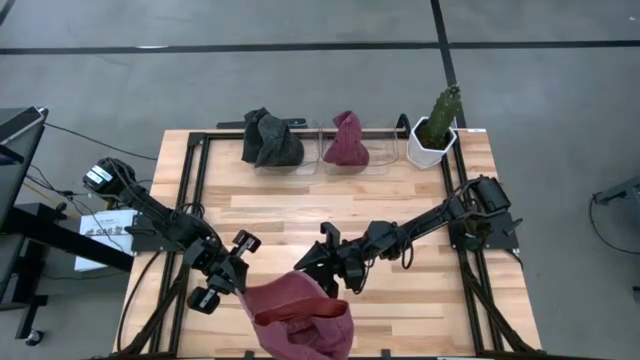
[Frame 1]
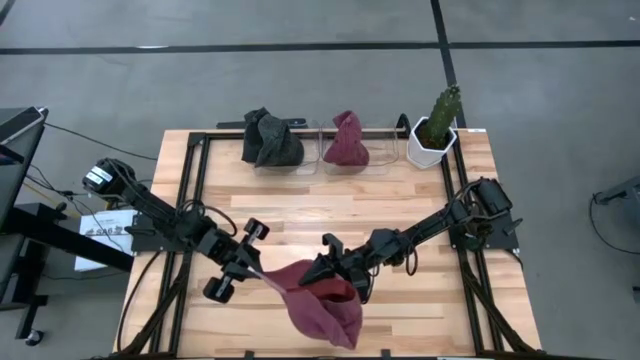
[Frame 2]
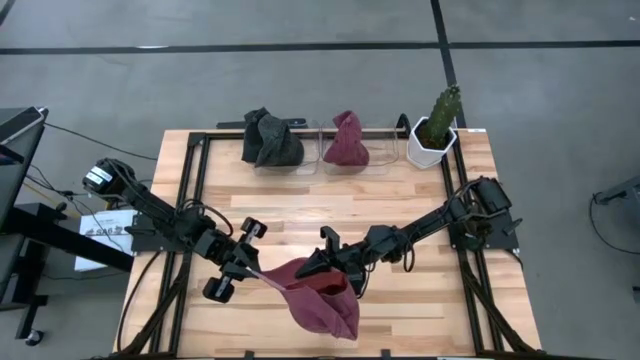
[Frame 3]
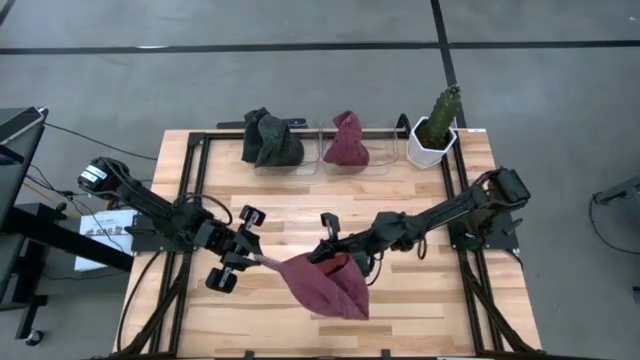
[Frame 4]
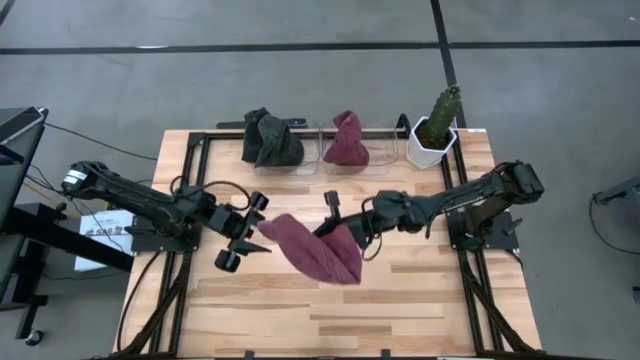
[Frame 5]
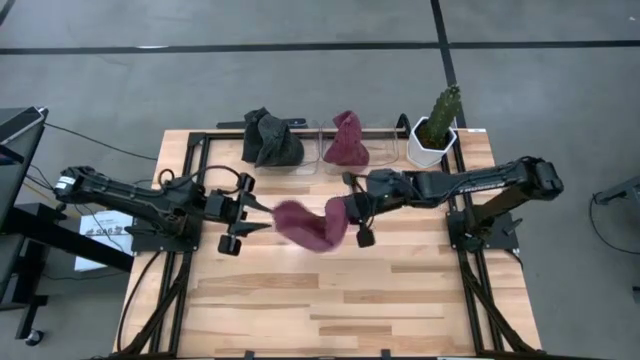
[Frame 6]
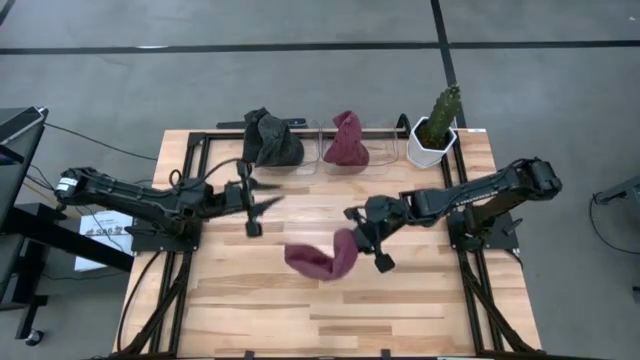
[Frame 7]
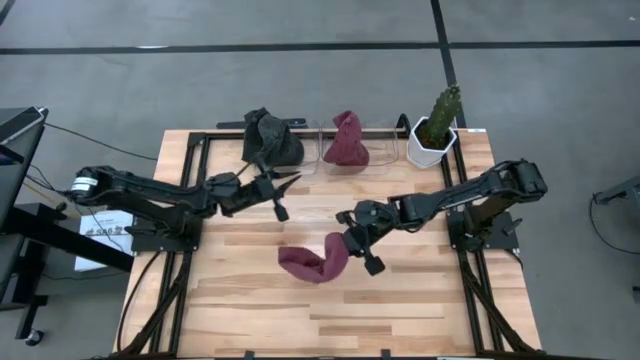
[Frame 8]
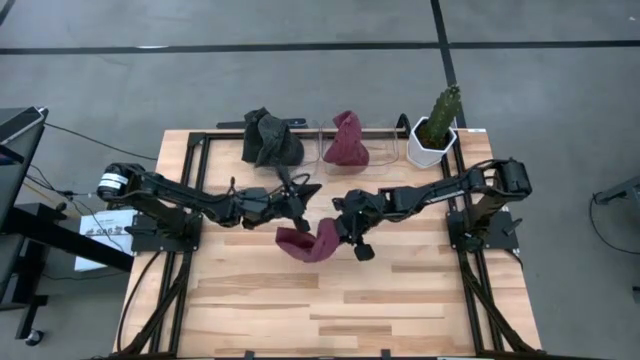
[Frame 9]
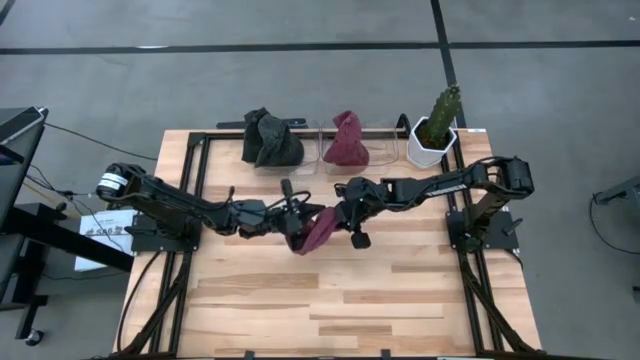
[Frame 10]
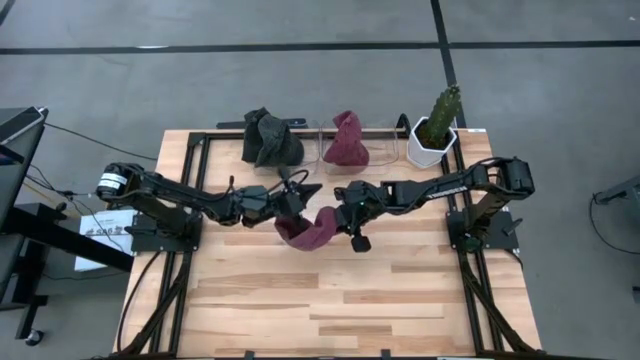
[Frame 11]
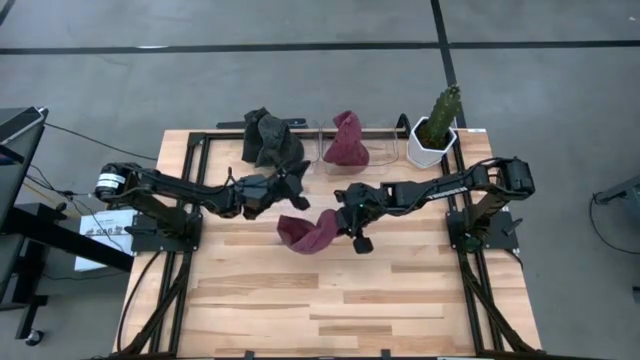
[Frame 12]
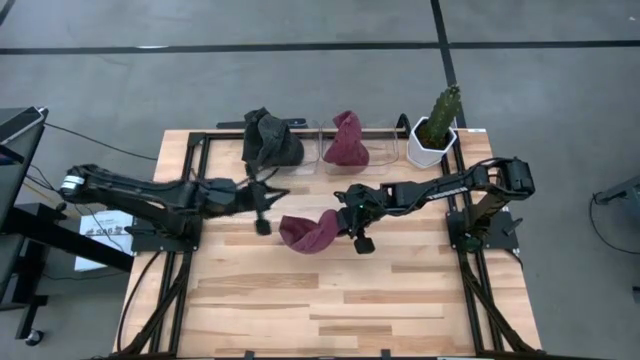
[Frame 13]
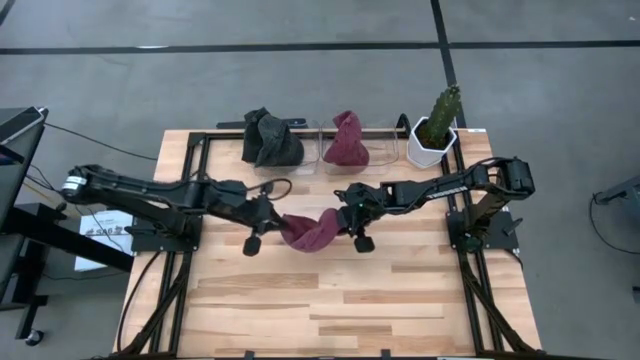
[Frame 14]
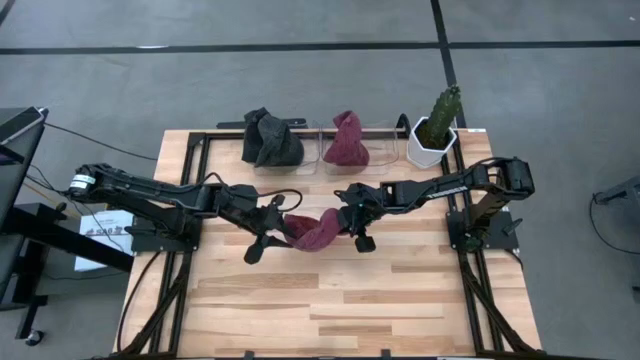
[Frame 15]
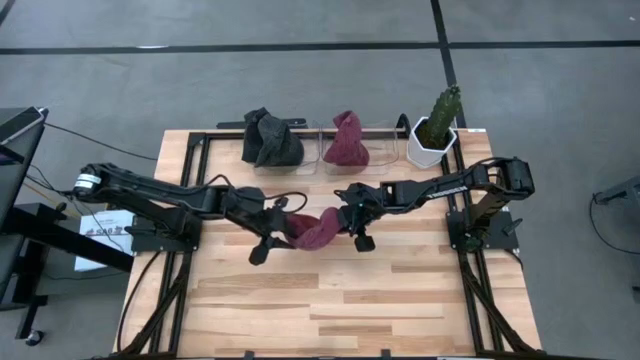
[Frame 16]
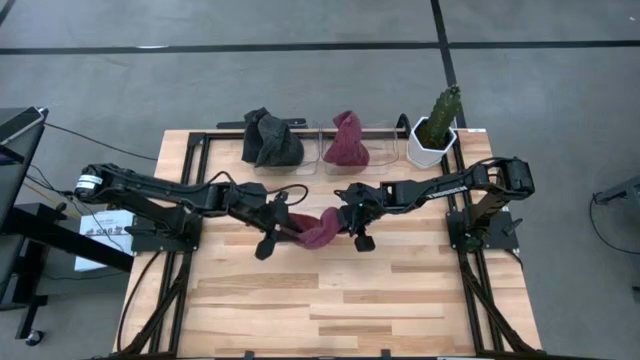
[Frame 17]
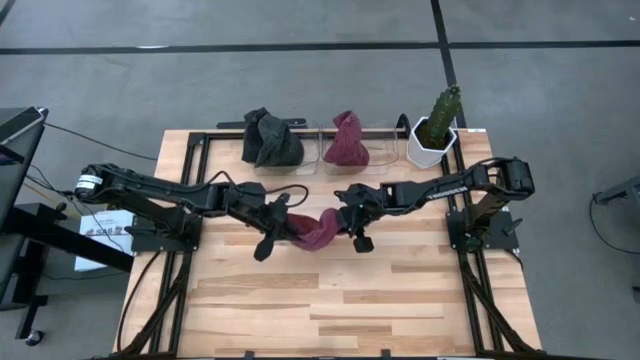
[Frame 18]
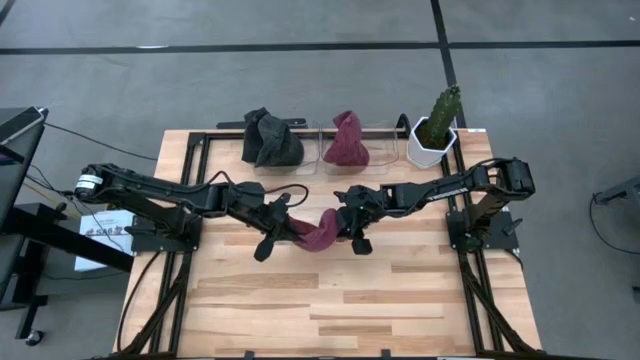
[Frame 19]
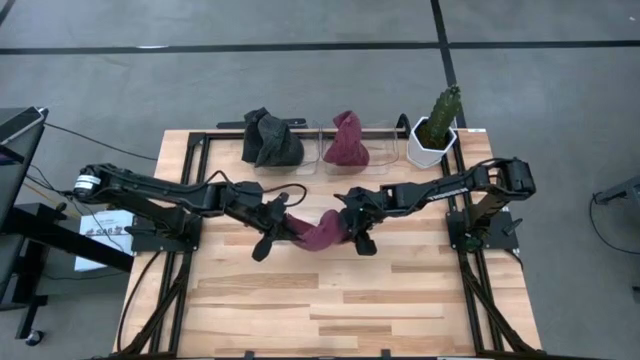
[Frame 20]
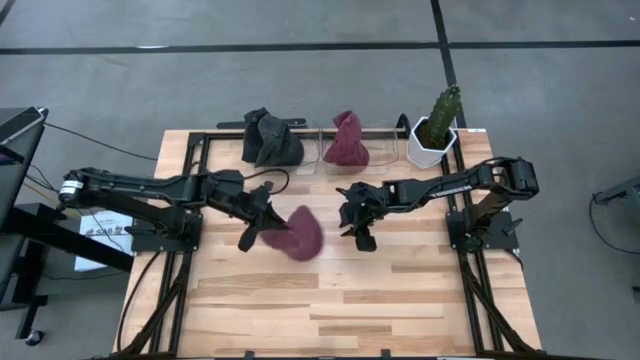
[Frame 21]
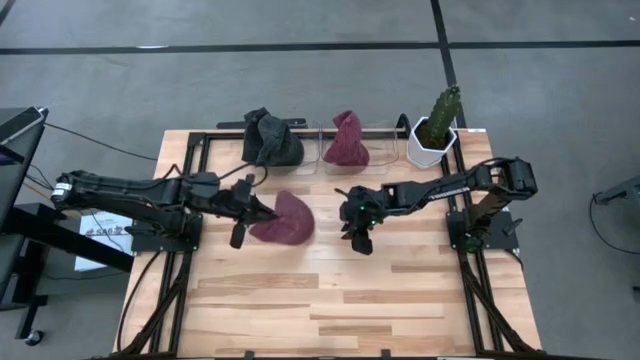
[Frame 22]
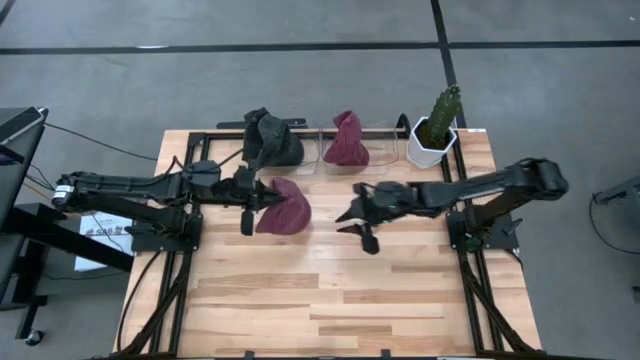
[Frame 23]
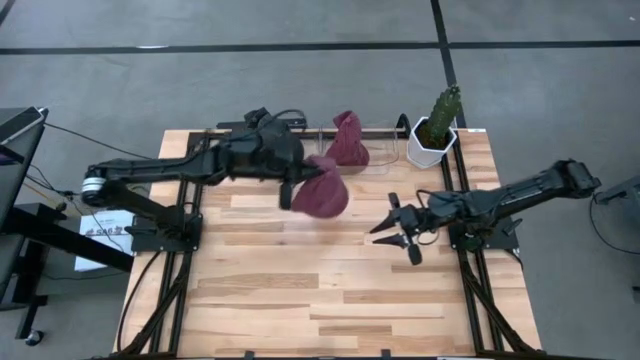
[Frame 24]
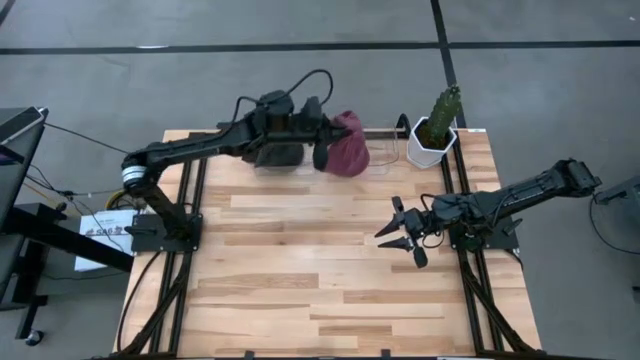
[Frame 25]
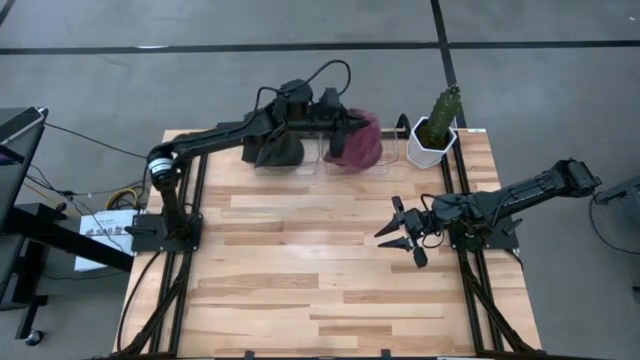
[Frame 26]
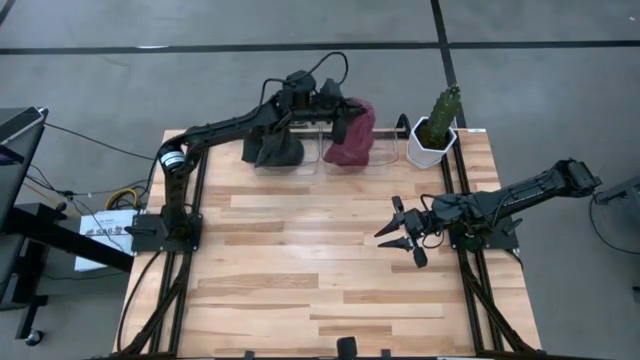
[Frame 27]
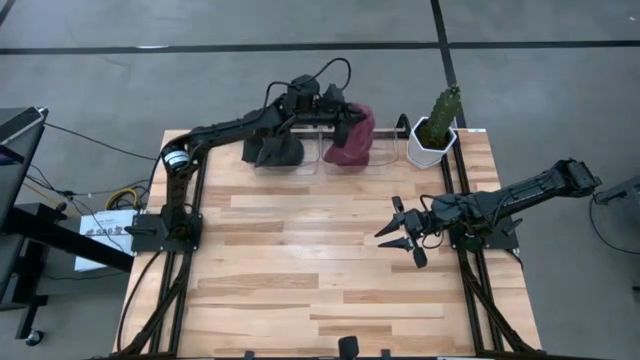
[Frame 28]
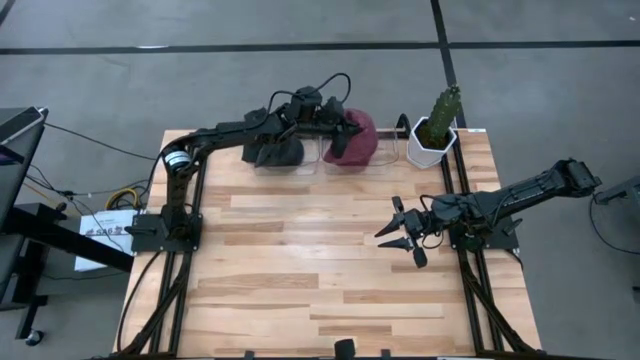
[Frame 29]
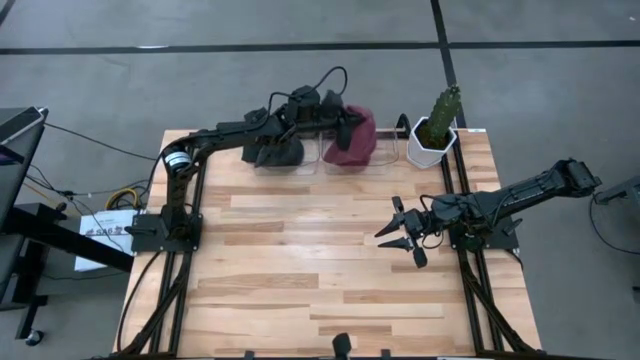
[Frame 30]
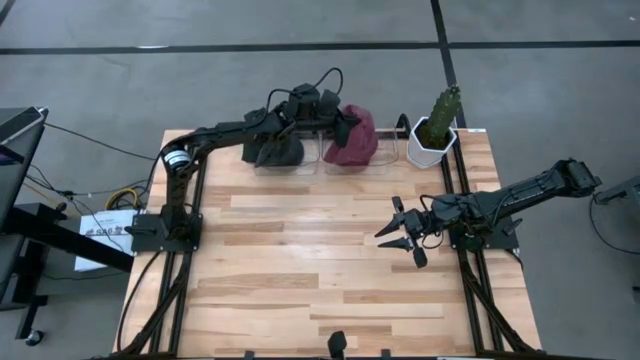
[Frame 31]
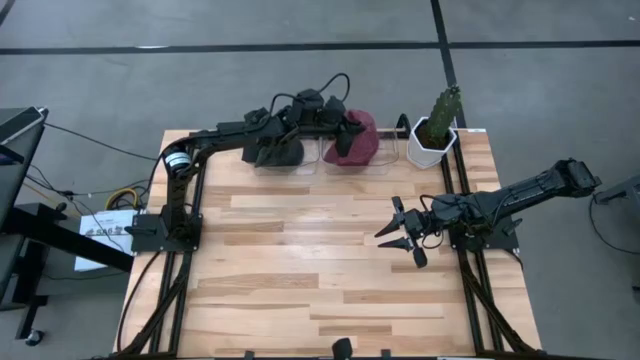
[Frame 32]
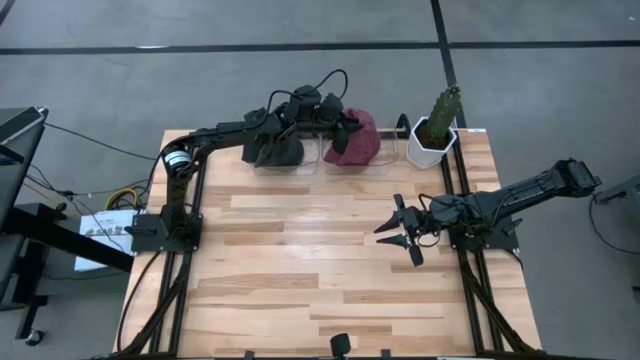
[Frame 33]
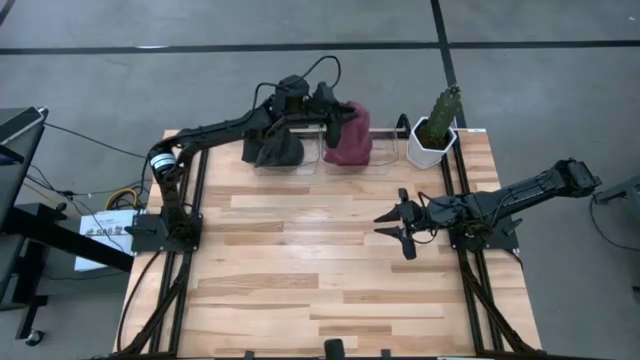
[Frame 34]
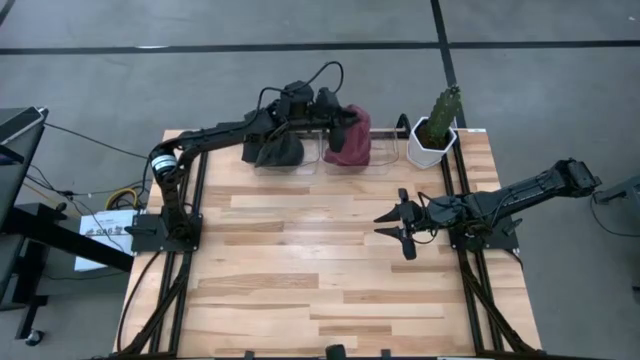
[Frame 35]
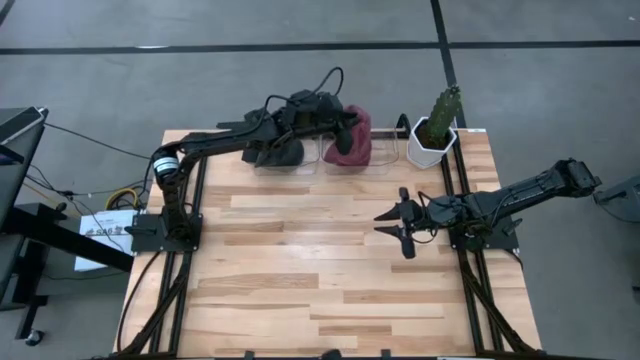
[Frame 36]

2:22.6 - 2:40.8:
Task: Pick & Place hat
Put the red cap into the right transparent bin

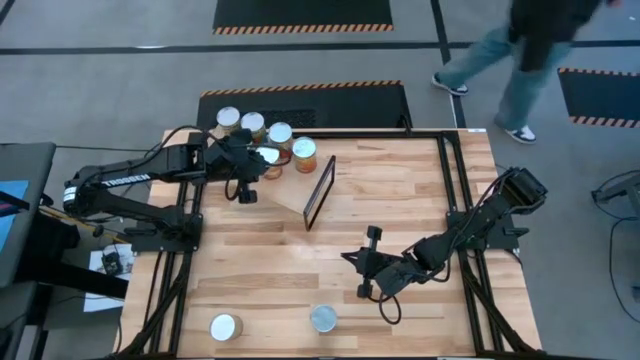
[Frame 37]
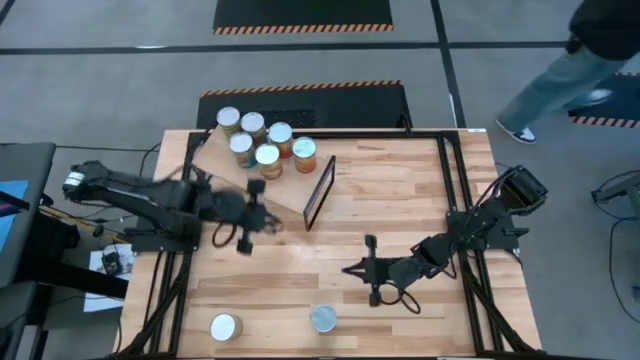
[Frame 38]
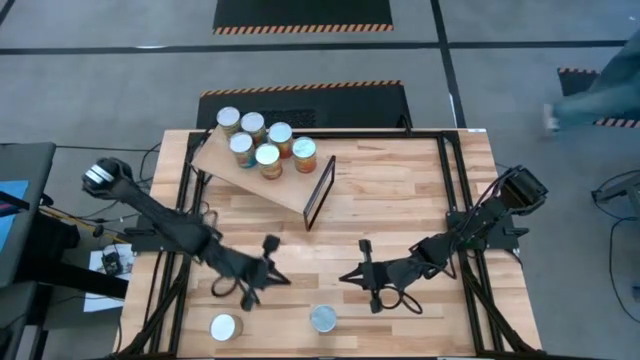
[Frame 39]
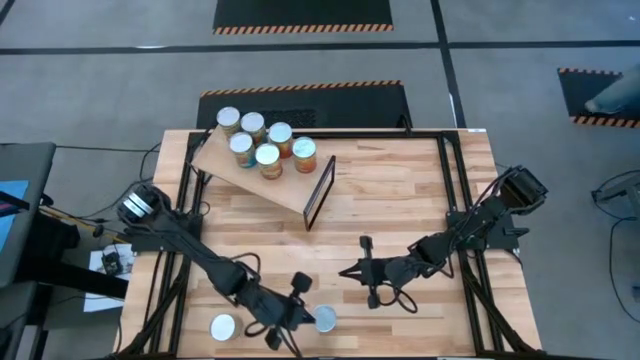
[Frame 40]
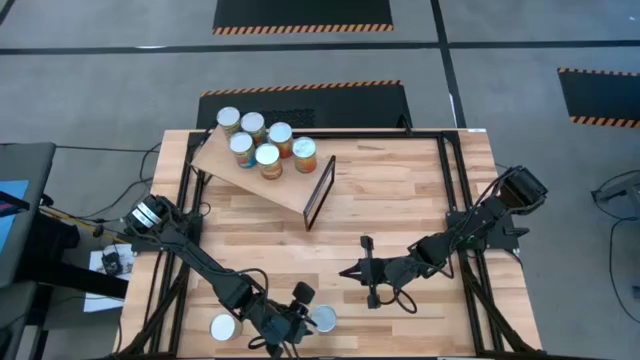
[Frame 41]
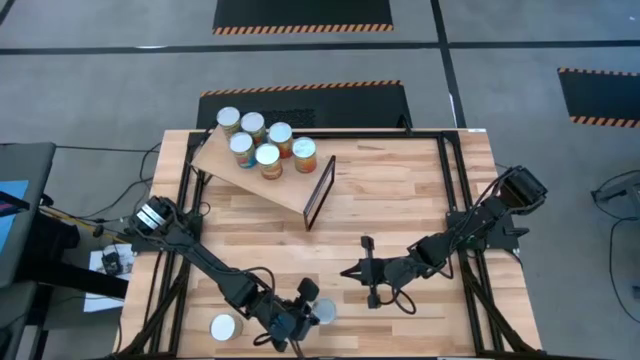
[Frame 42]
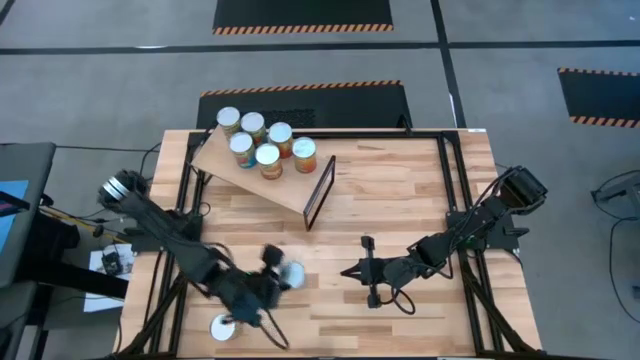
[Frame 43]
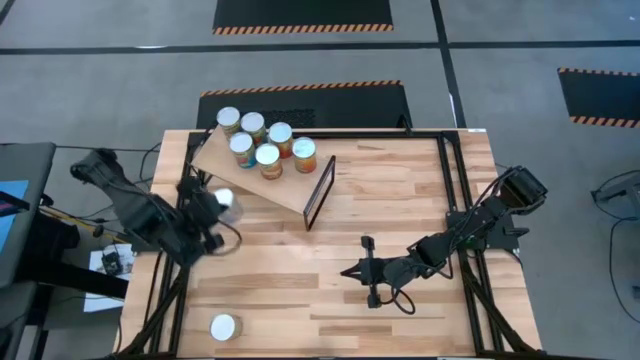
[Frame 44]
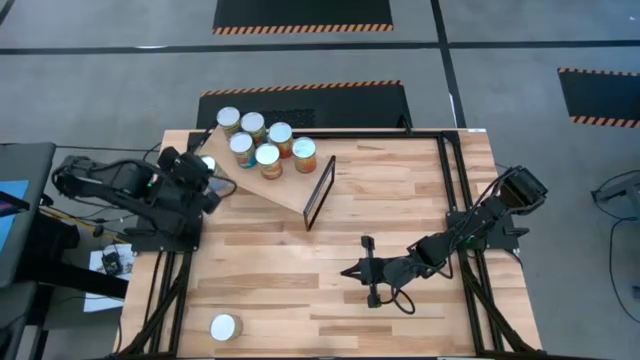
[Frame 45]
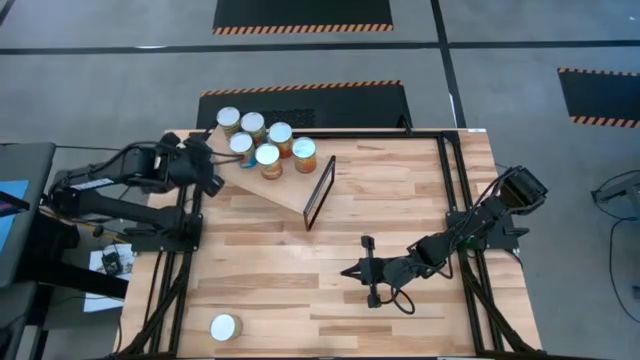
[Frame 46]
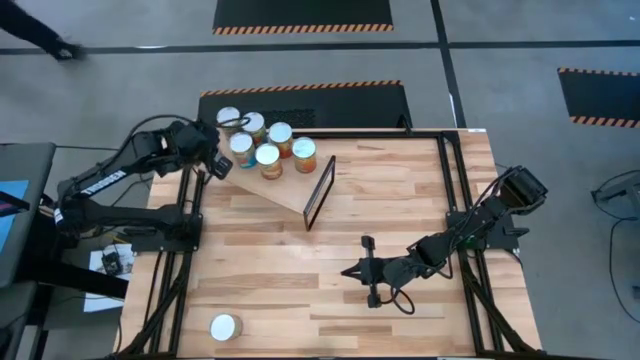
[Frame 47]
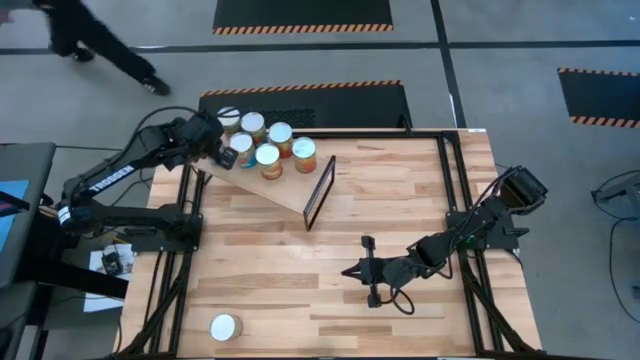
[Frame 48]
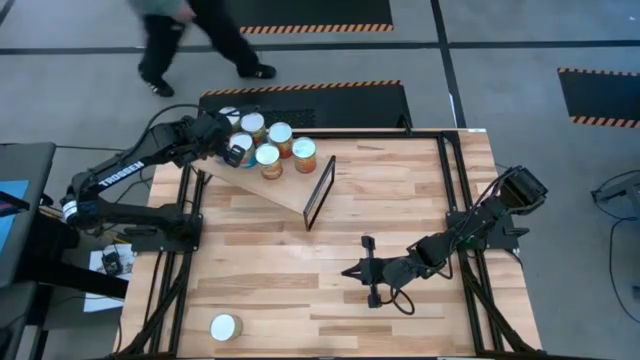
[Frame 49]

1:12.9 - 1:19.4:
Task: Pick and place cans onto a shelf
Align the canned peaches with the other canned peaches on the shelf
